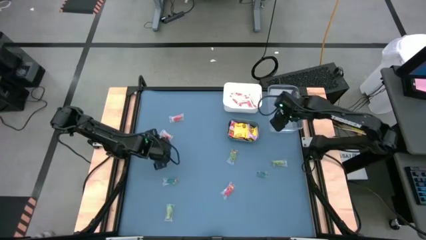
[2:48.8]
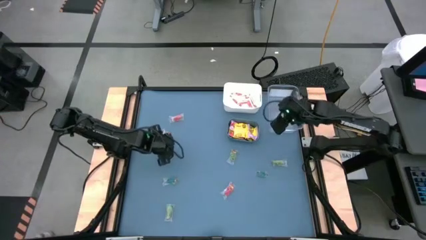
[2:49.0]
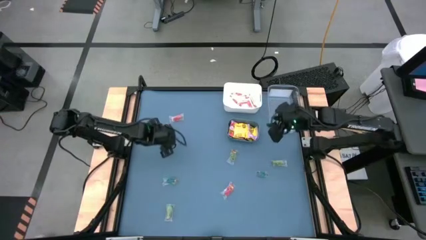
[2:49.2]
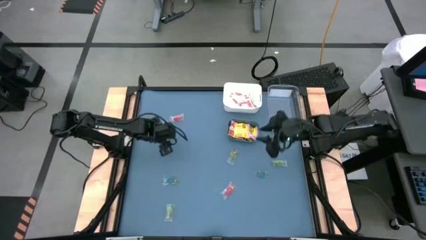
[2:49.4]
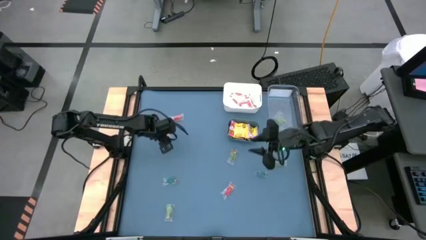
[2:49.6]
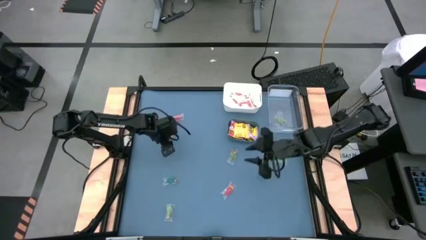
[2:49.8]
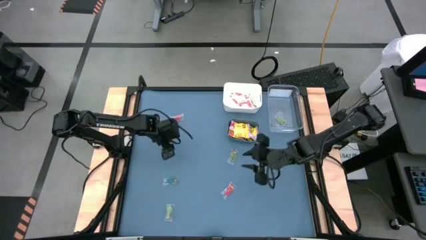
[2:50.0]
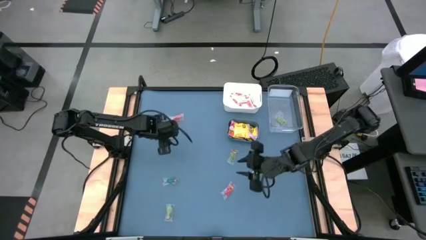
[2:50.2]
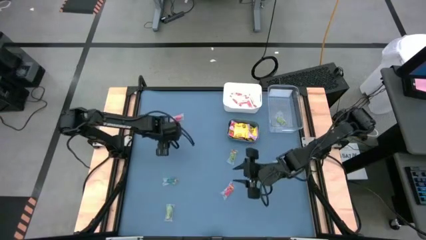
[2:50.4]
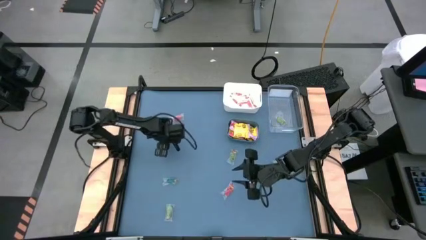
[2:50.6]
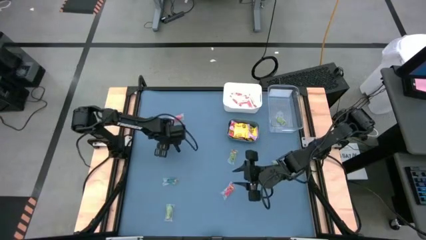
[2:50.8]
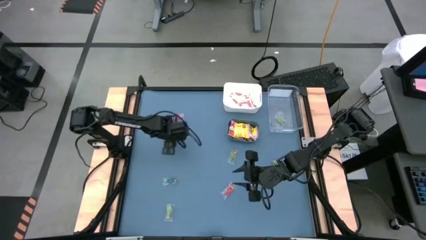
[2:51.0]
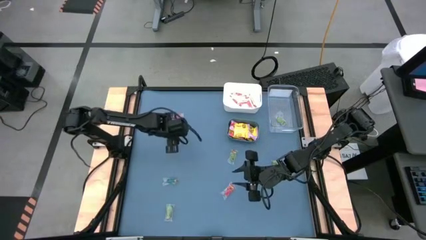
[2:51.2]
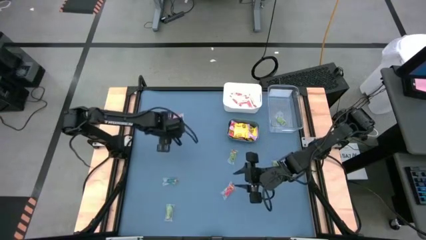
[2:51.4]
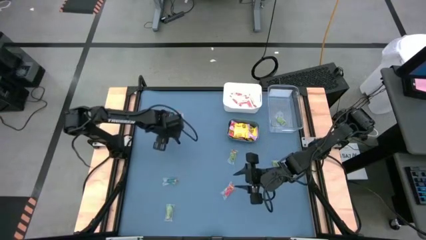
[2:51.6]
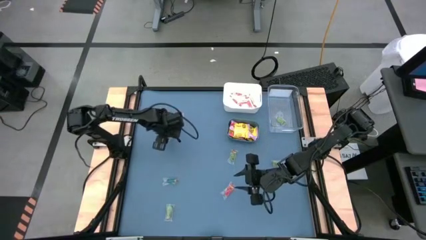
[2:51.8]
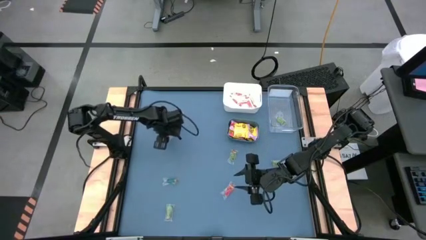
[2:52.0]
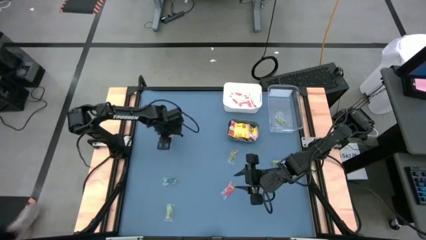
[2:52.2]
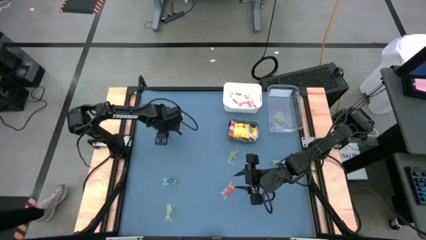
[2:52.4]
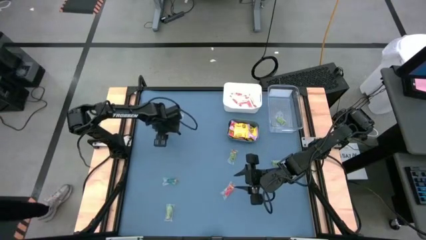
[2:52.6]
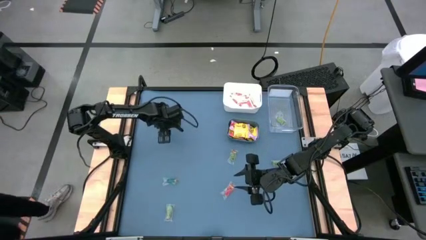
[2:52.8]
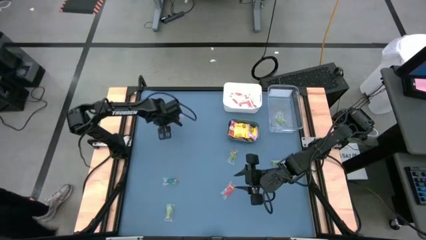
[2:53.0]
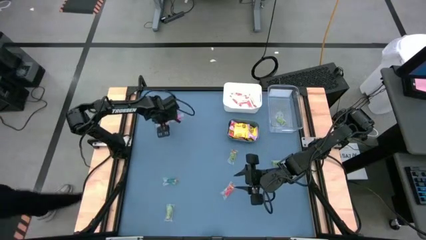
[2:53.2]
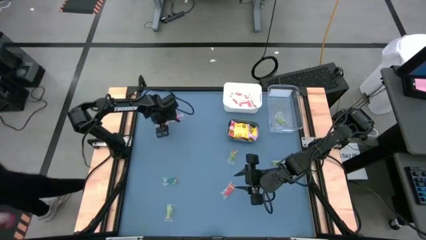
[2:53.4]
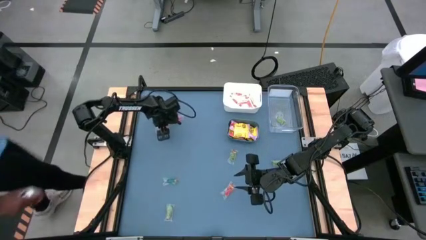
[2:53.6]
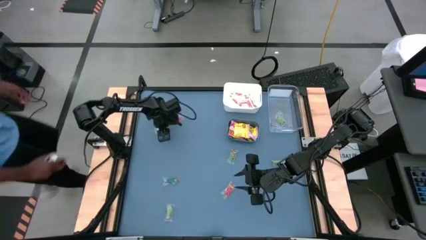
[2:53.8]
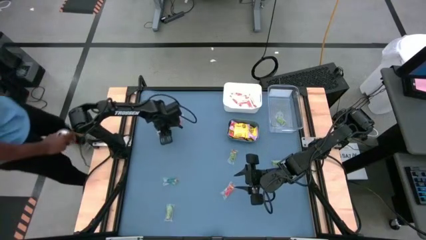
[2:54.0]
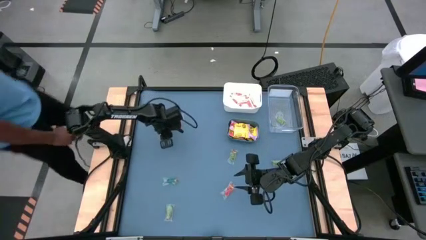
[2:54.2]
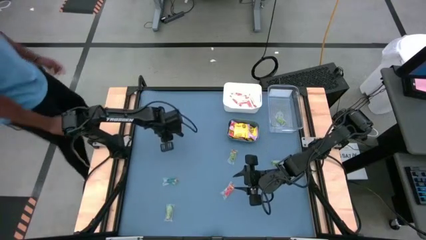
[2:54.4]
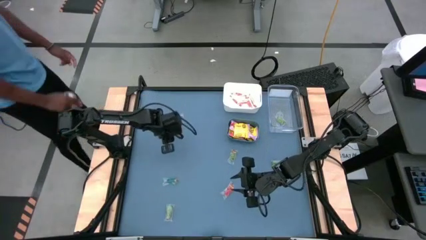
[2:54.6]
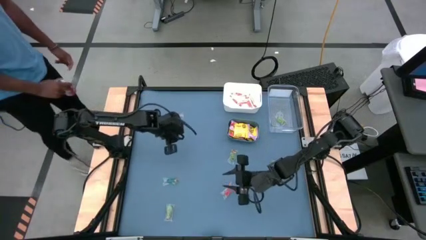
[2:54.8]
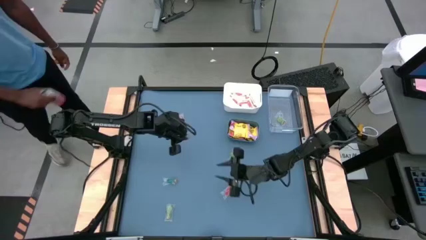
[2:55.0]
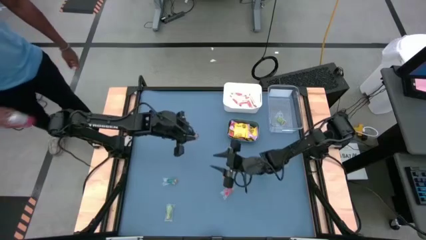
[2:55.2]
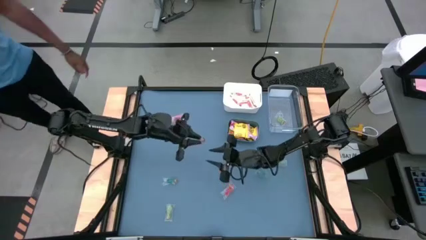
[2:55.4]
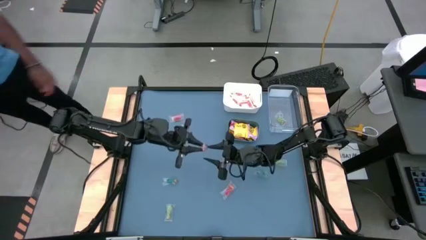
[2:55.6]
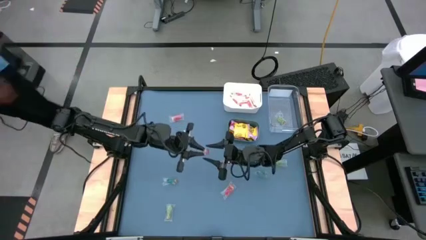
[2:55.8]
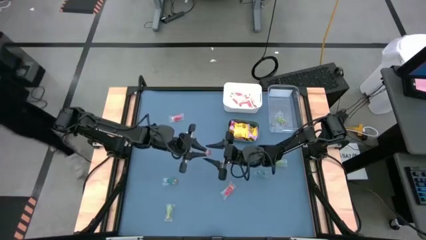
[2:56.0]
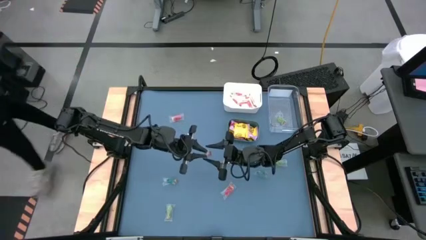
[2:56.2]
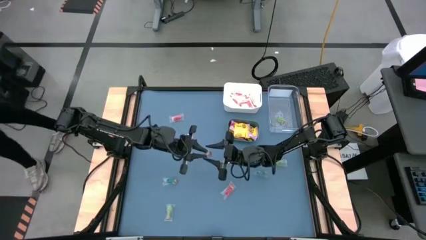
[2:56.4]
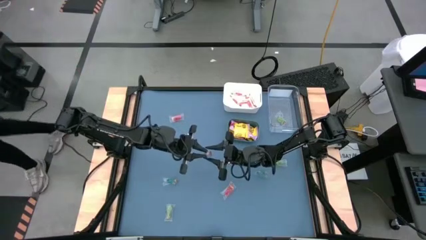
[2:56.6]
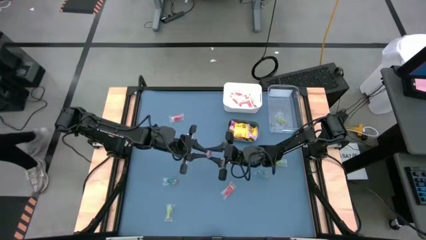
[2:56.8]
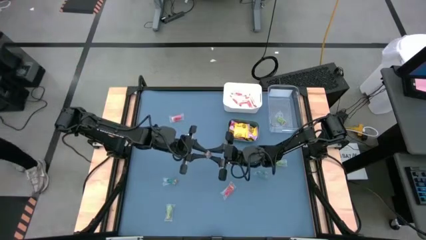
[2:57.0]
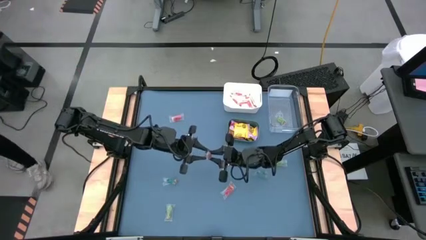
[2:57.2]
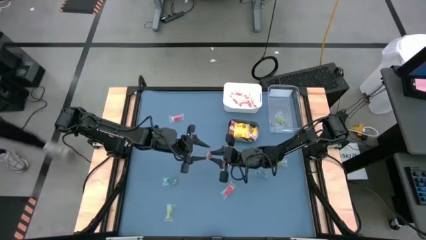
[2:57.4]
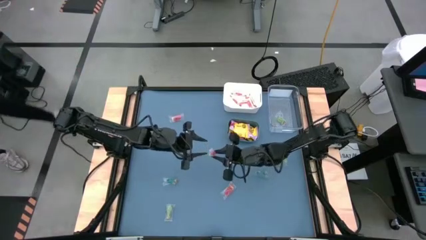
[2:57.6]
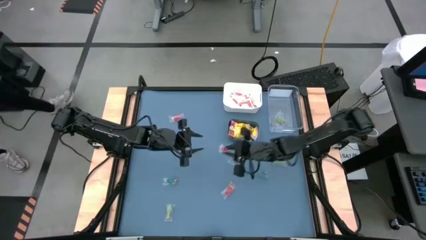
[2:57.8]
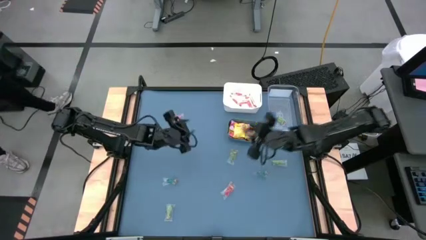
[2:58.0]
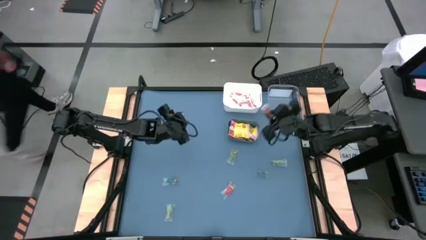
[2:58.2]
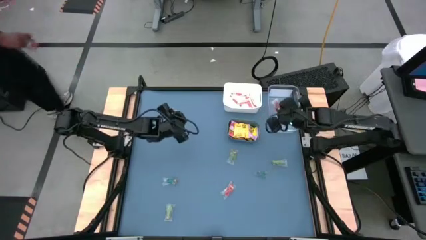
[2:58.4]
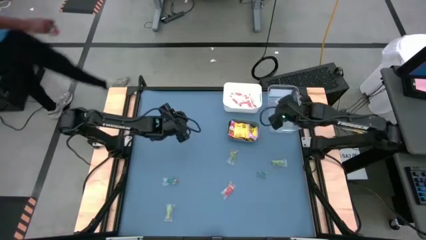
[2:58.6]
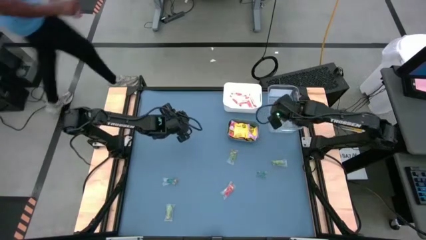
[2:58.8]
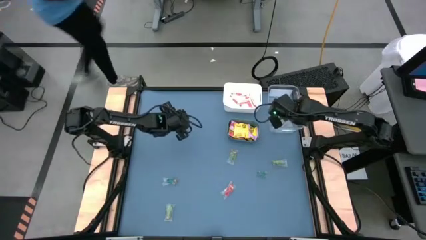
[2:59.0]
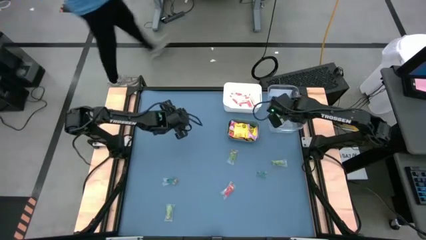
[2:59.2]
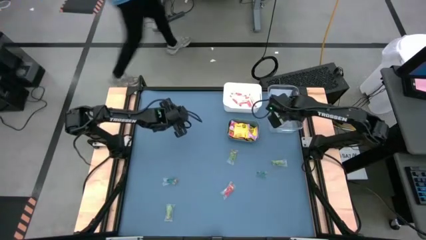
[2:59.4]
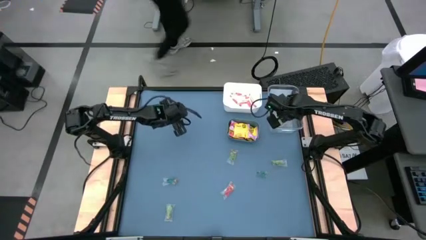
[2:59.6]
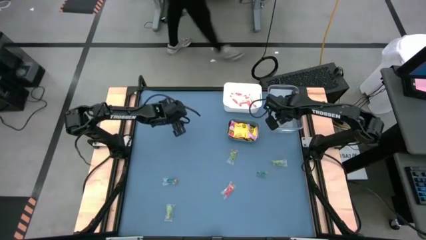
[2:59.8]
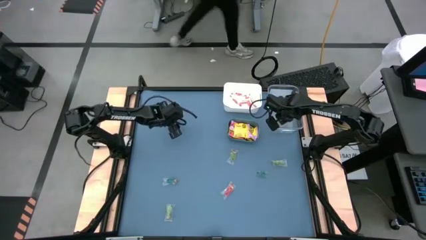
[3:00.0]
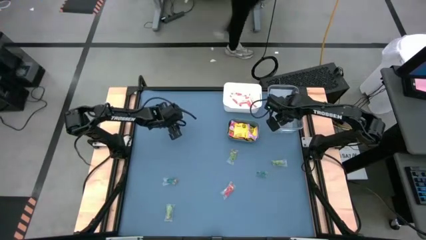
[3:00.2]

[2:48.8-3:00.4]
Task: Sort candy
Put the top left orange candy into the transparent bin

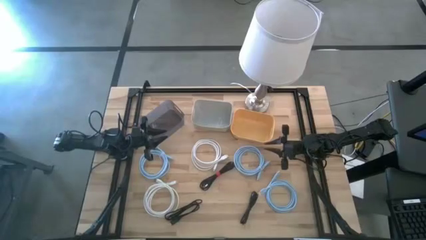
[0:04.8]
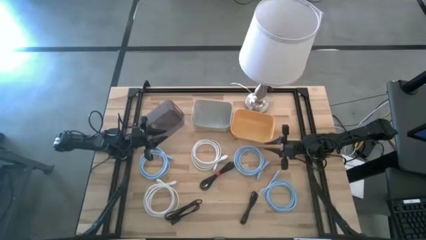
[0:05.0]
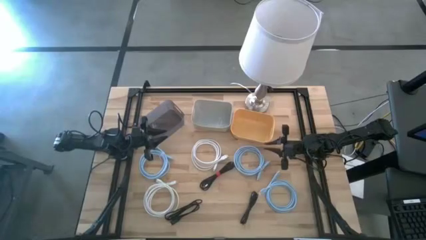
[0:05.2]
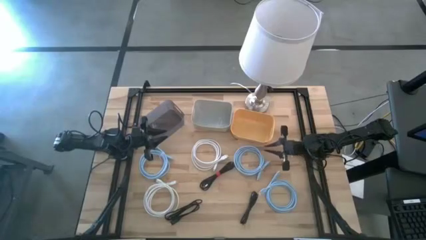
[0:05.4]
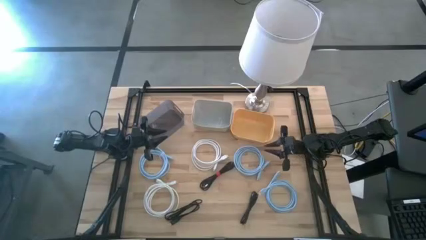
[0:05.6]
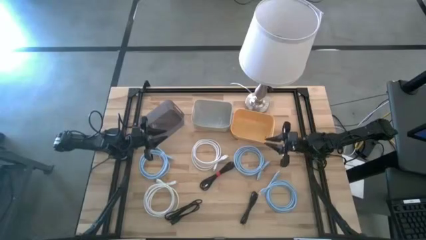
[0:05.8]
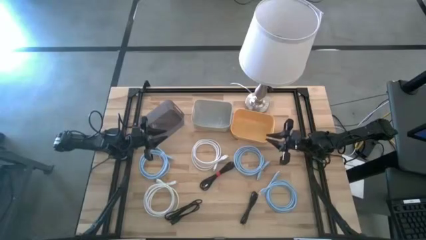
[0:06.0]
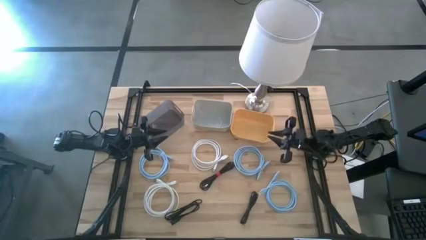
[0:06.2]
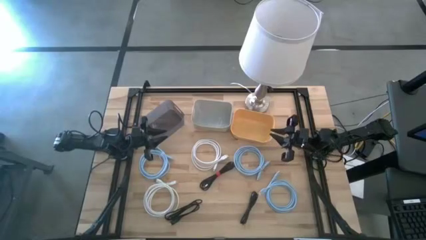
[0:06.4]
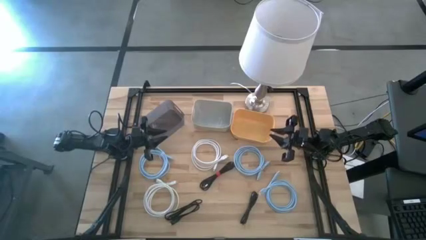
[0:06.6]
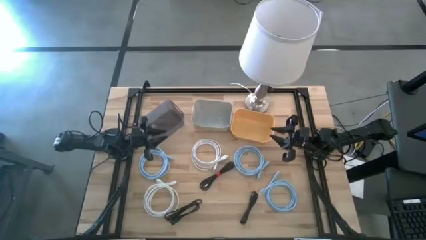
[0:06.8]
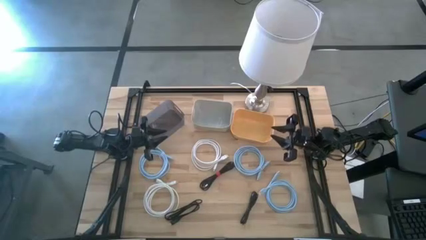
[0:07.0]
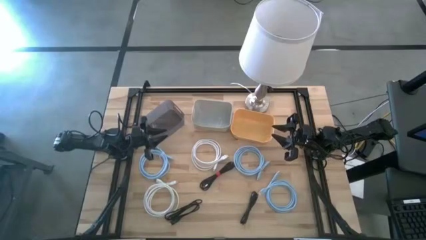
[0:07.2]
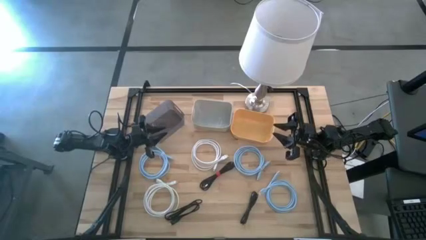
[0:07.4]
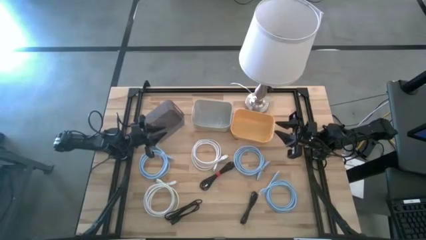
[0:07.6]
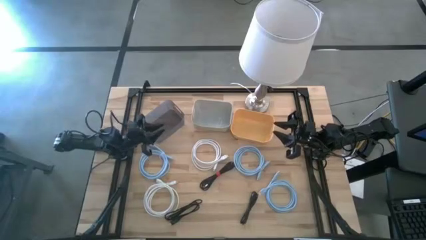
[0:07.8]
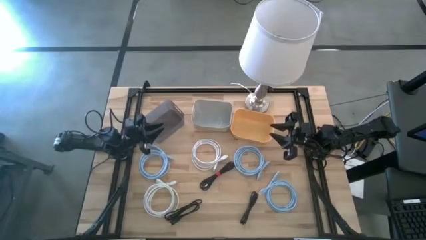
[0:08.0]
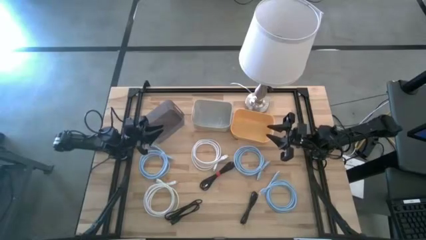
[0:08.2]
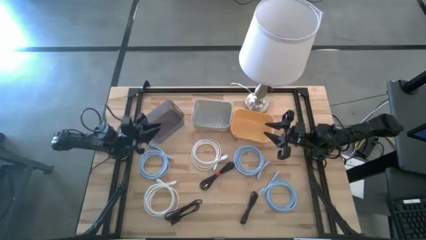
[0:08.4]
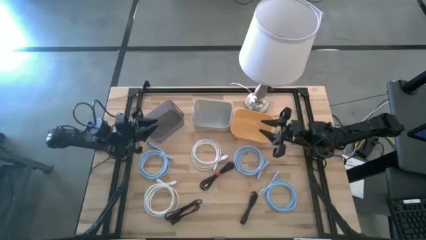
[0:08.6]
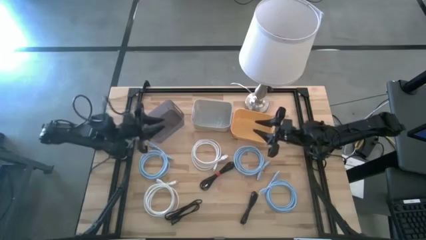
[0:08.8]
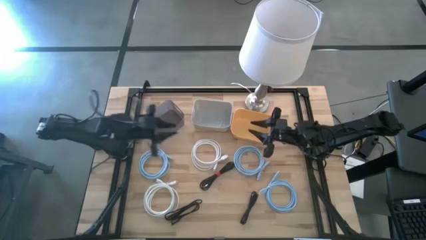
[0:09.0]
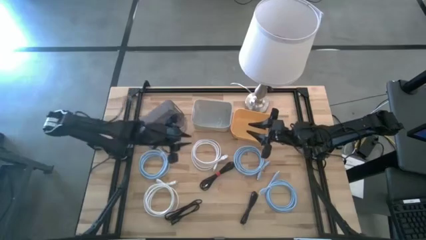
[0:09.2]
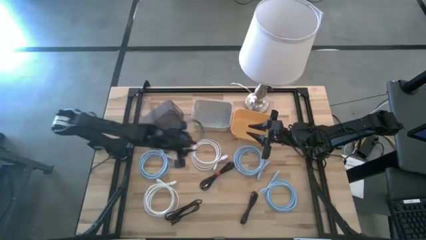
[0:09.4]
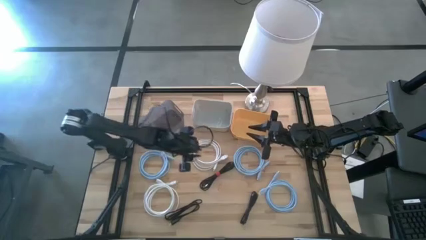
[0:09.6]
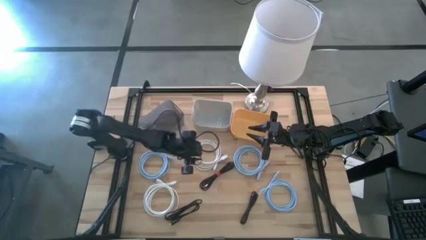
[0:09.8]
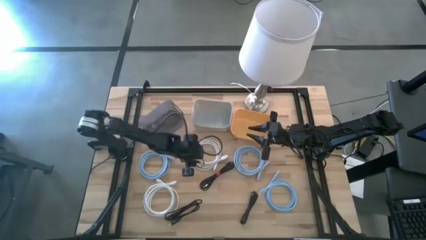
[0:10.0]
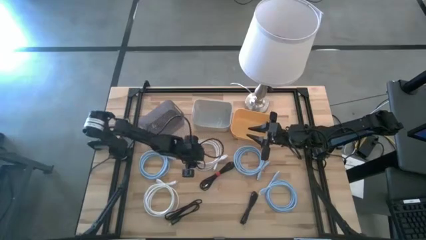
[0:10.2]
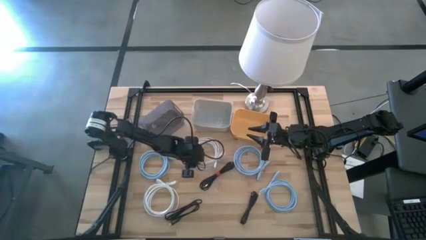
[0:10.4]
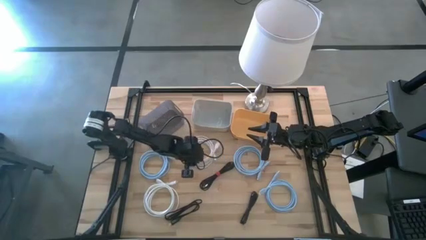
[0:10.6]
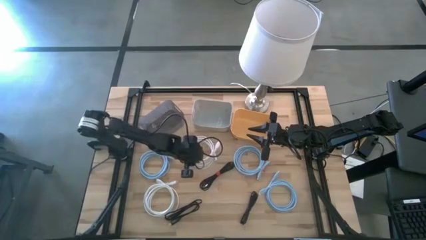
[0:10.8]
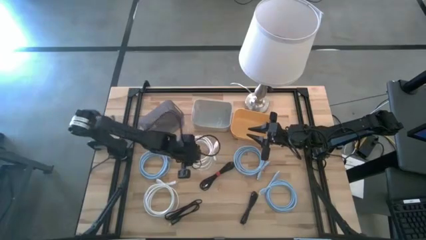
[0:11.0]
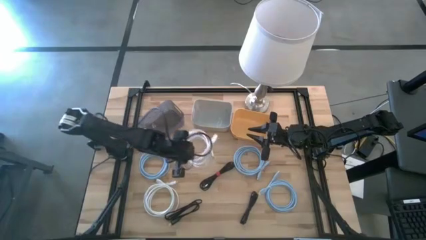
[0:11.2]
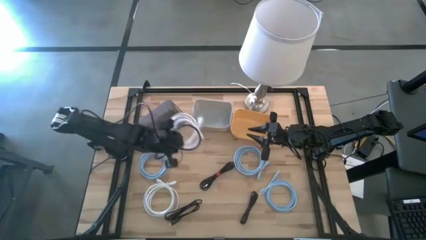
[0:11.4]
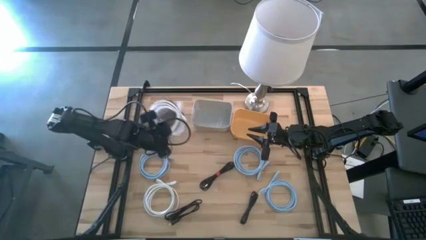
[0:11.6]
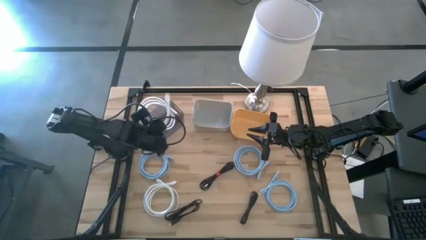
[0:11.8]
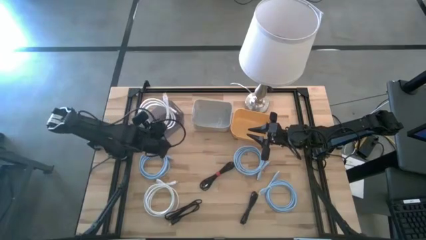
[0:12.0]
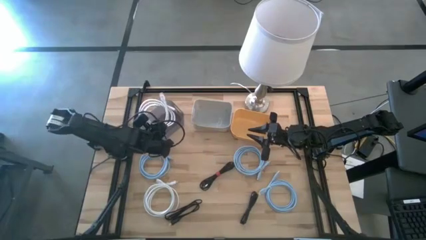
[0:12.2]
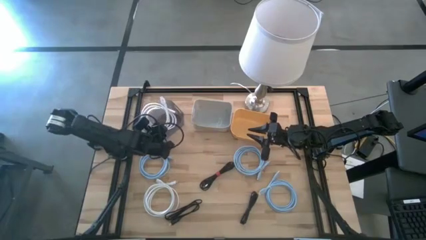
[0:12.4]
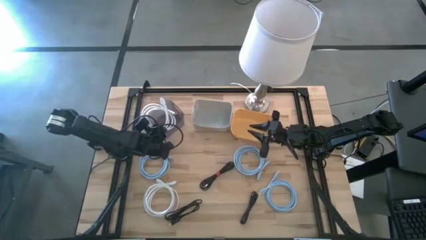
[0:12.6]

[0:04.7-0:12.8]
Task: Pick & Place USB Port
Put the top white HDMI cable into the black bin
